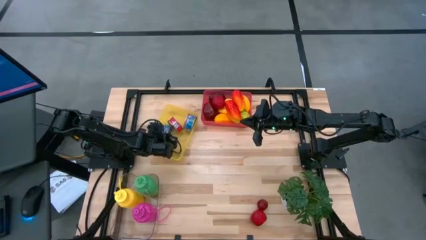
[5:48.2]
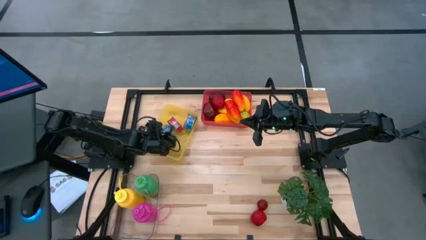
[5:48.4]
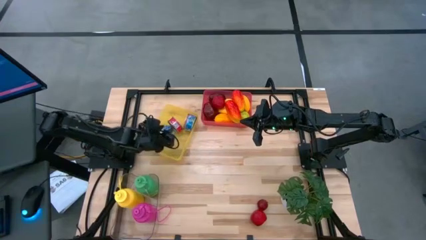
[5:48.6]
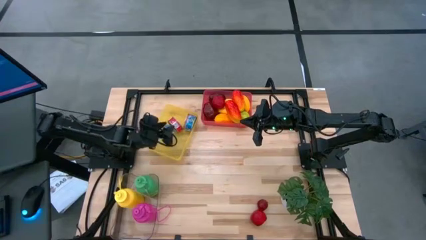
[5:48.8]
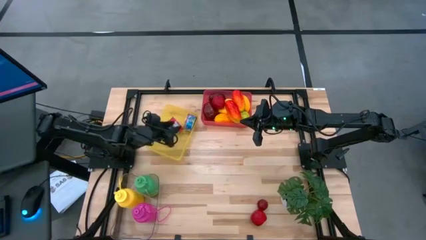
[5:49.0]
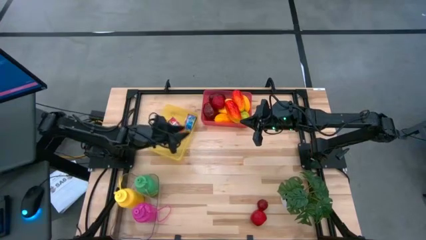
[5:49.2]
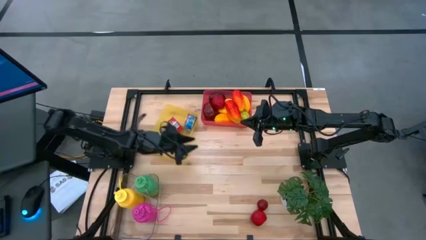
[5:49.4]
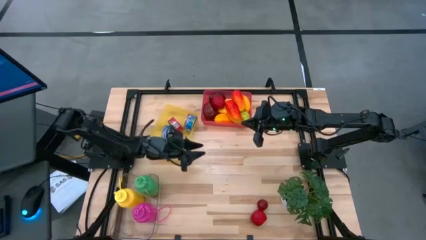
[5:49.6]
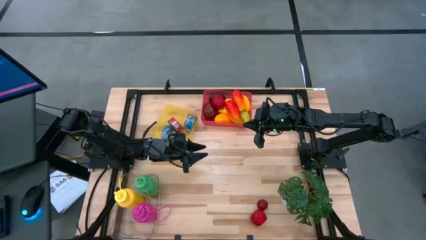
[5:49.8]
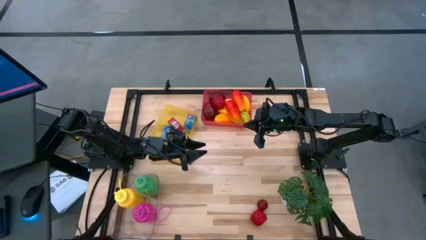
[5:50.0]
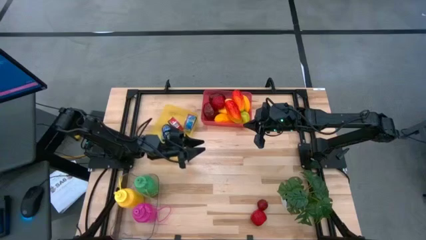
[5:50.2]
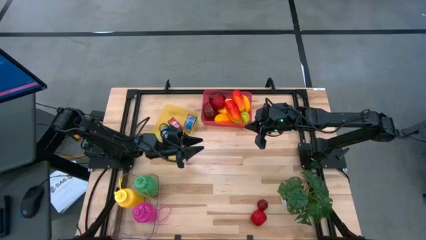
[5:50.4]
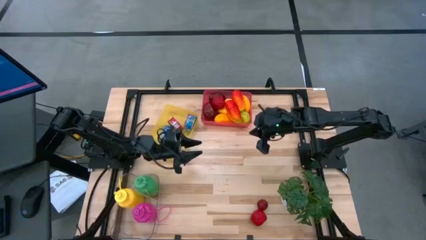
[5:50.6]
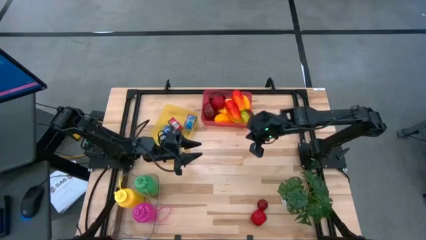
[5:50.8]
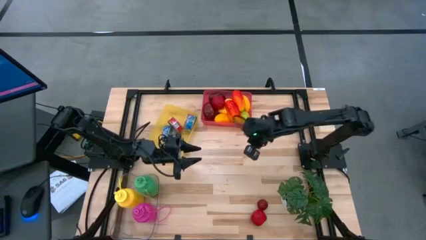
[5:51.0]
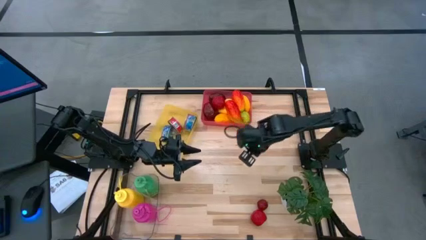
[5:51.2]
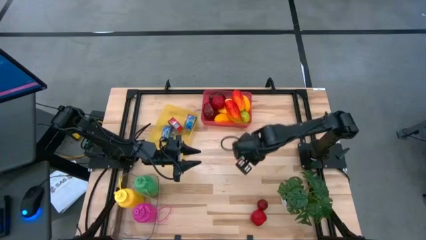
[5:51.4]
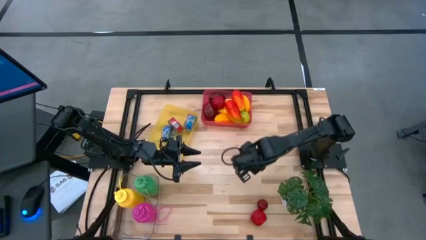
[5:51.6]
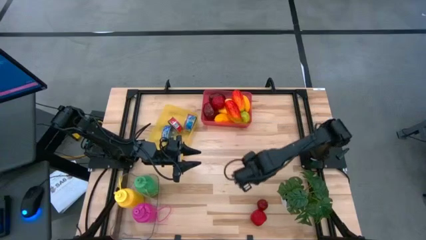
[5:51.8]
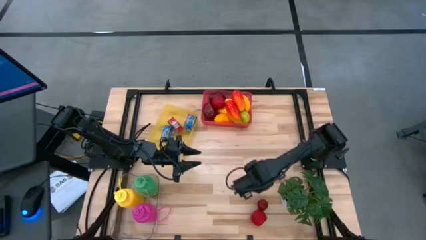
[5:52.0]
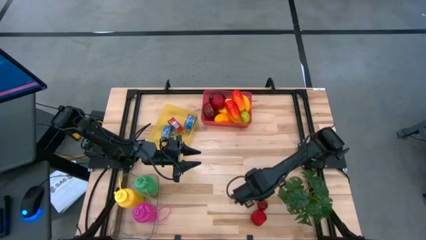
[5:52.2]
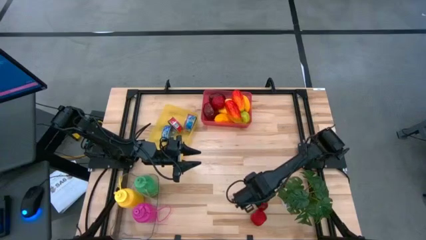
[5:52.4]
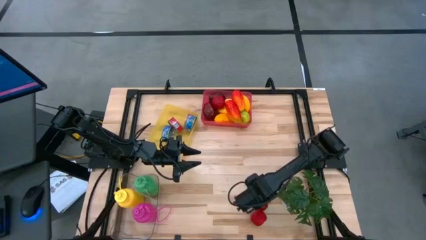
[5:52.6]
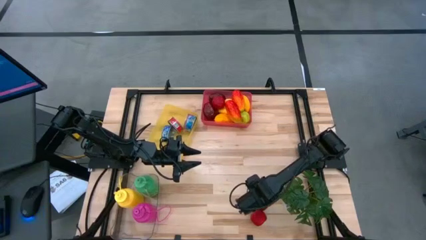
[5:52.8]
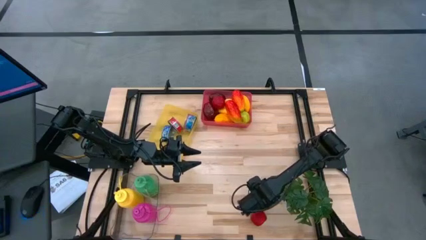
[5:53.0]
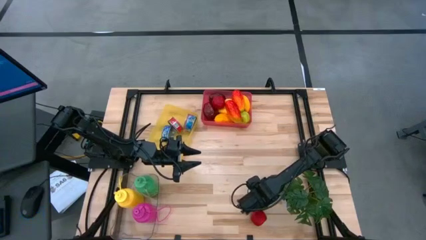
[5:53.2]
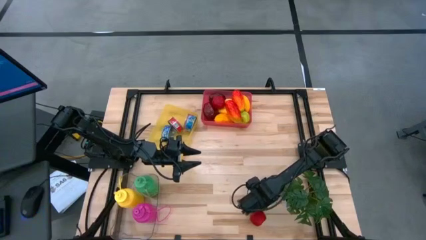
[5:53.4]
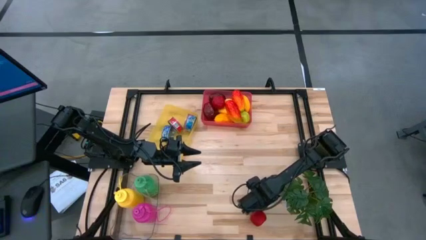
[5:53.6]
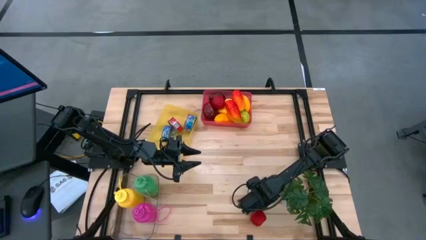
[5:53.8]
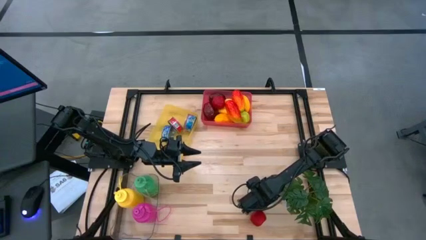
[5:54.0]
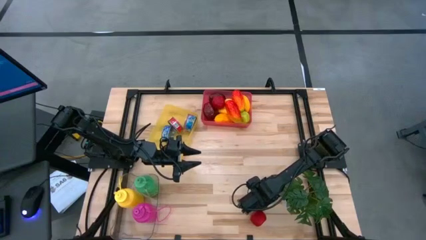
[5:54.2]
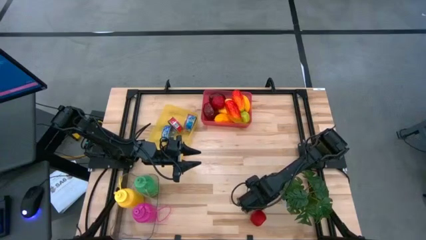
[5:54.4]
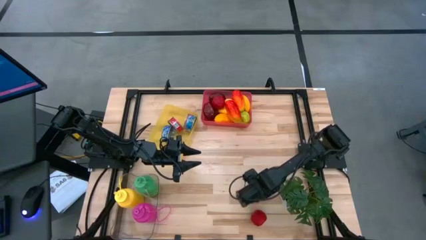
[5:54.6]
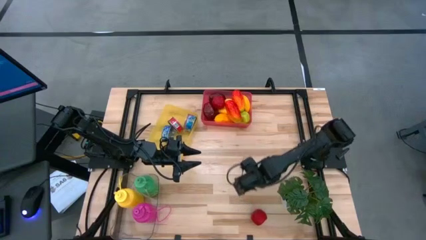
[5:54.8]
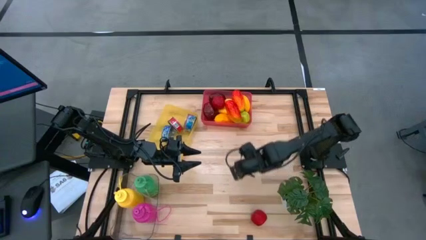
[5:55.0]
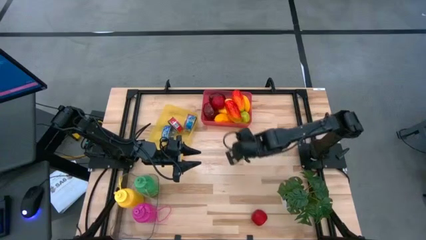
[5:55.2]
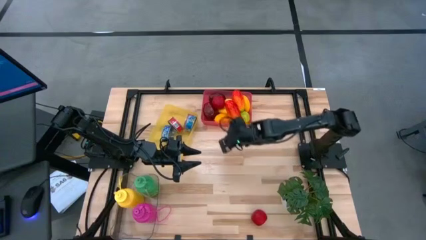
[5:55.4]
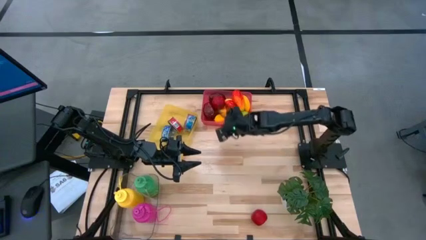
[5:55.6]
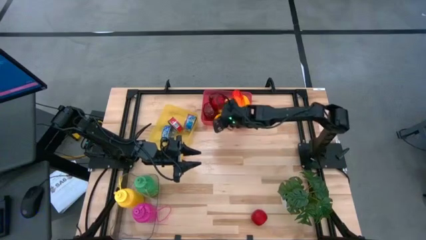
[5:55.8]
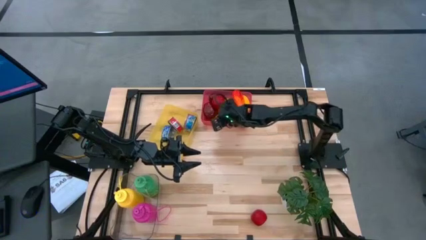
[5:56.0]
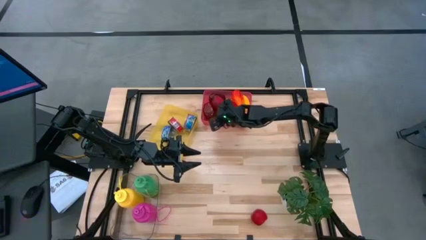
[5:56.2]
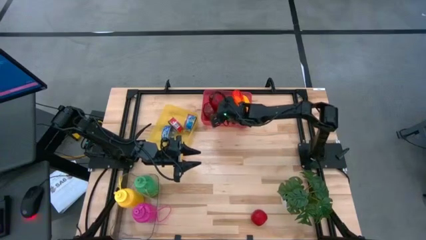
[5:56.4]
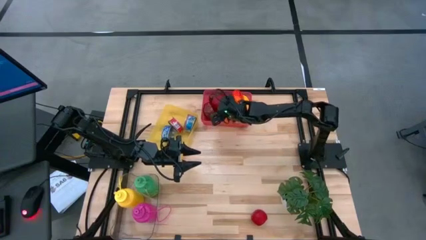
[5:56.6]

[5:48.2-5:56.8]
Task: Pick & Place Food Item
Put the pomegranate into the pink bin

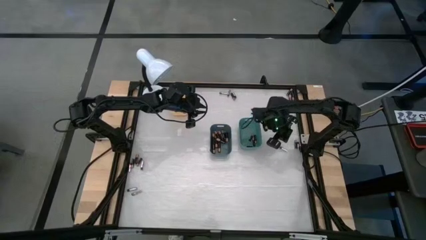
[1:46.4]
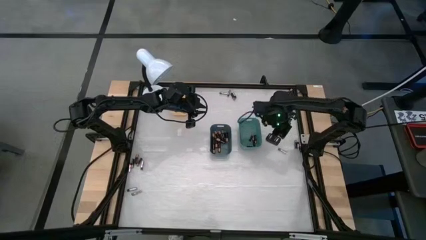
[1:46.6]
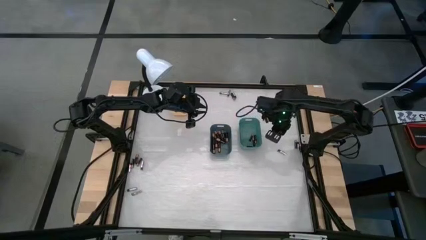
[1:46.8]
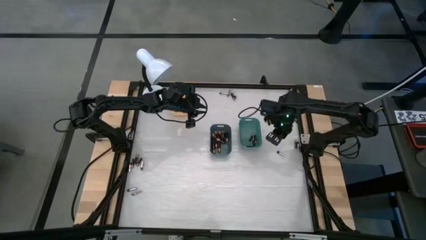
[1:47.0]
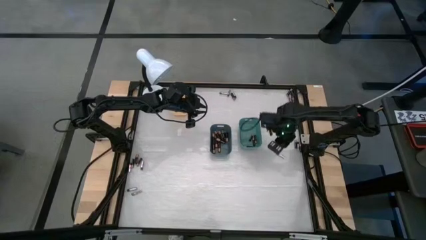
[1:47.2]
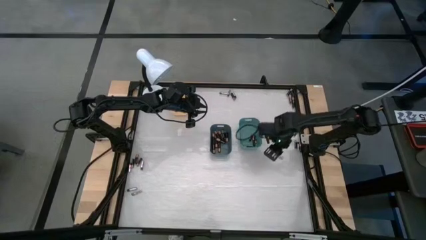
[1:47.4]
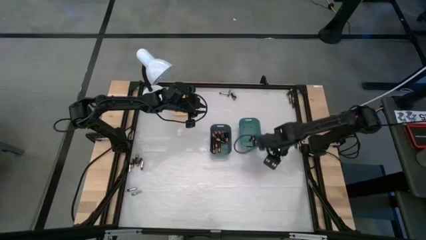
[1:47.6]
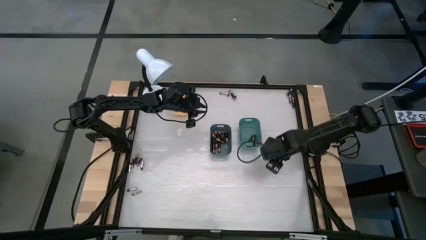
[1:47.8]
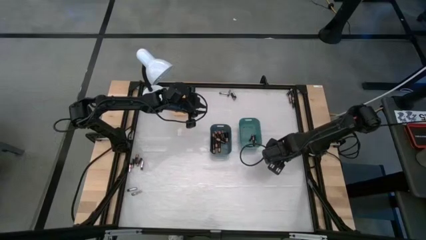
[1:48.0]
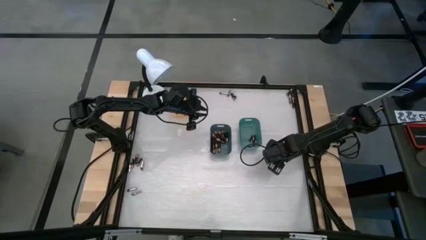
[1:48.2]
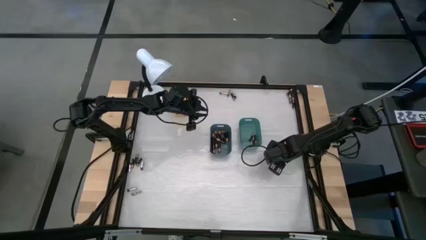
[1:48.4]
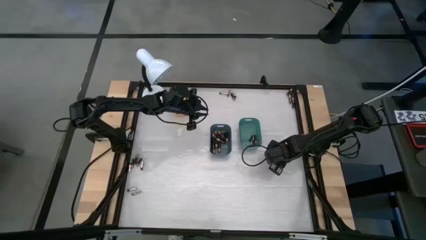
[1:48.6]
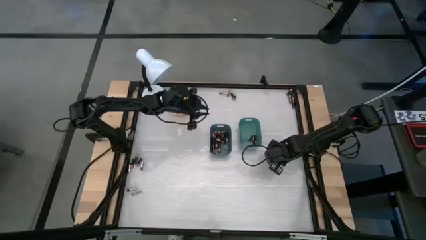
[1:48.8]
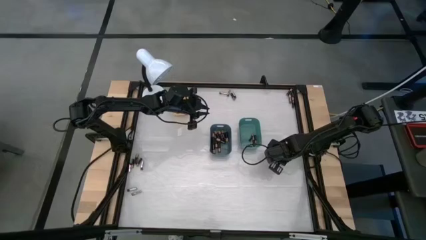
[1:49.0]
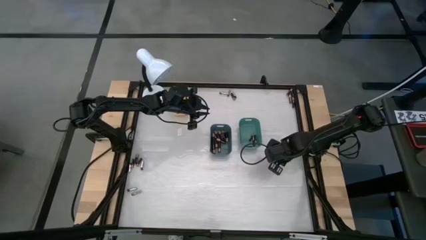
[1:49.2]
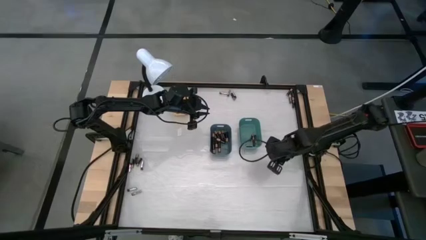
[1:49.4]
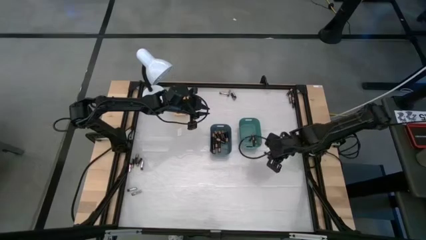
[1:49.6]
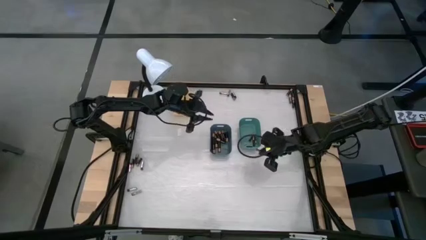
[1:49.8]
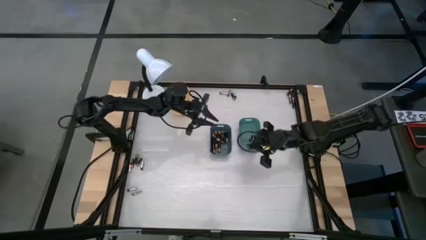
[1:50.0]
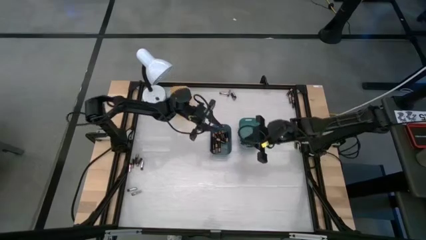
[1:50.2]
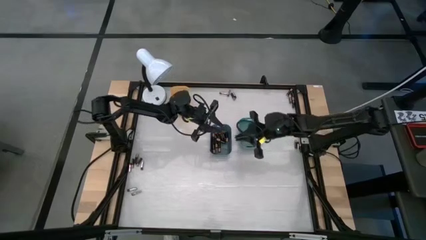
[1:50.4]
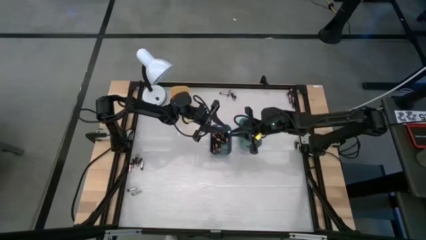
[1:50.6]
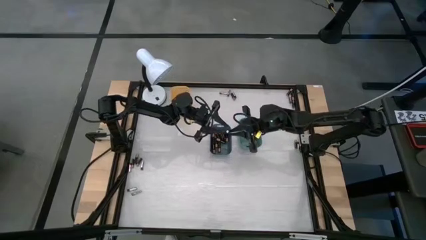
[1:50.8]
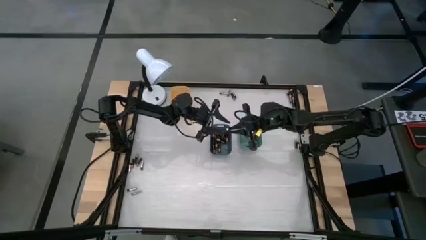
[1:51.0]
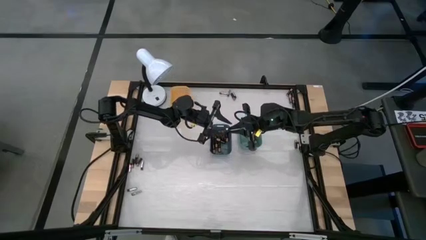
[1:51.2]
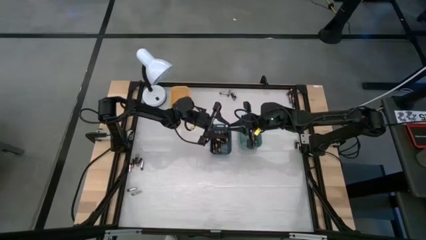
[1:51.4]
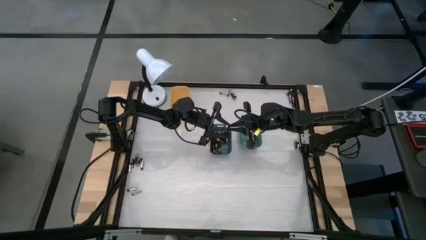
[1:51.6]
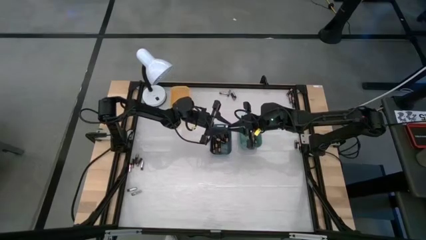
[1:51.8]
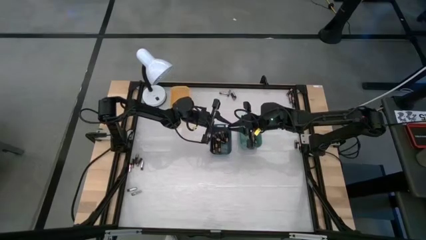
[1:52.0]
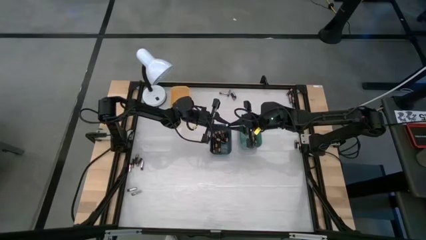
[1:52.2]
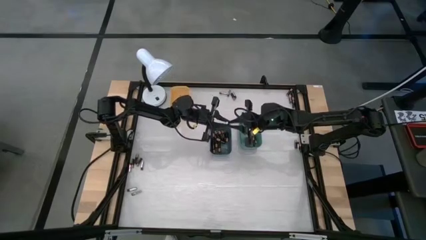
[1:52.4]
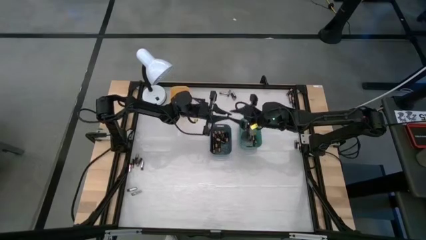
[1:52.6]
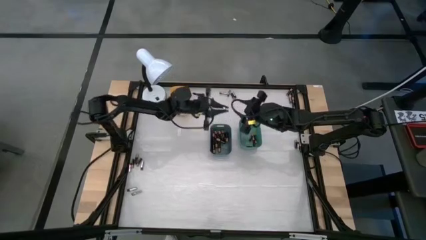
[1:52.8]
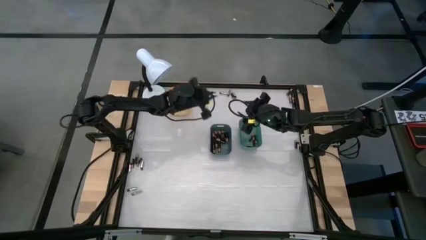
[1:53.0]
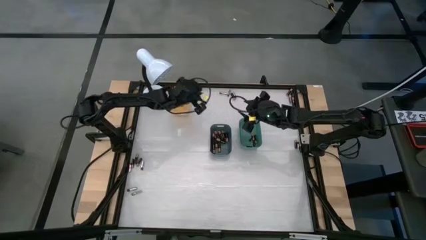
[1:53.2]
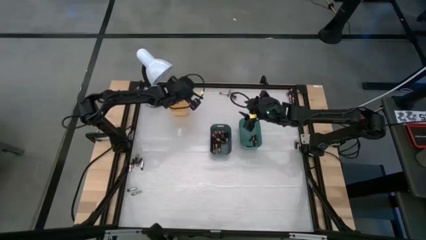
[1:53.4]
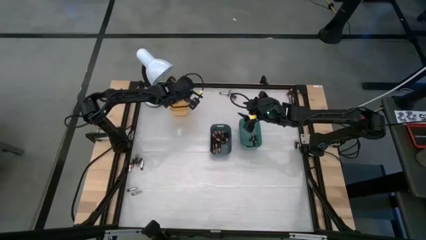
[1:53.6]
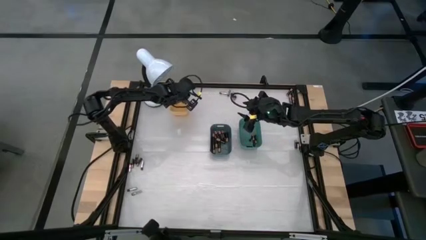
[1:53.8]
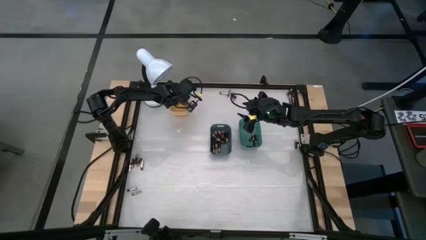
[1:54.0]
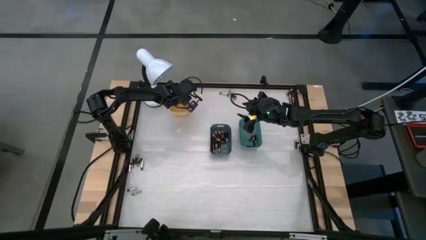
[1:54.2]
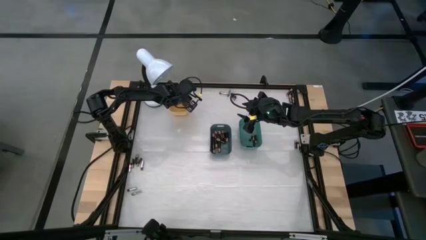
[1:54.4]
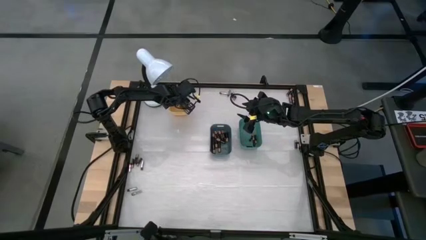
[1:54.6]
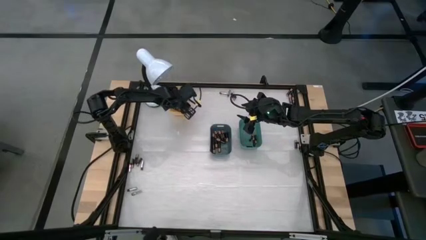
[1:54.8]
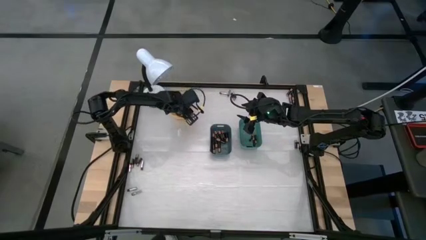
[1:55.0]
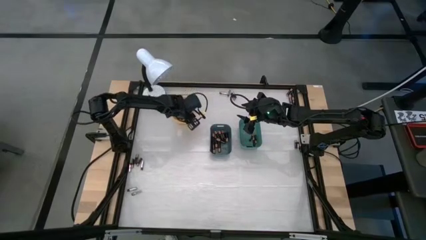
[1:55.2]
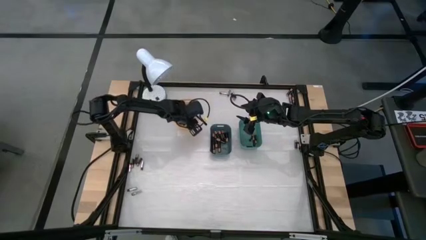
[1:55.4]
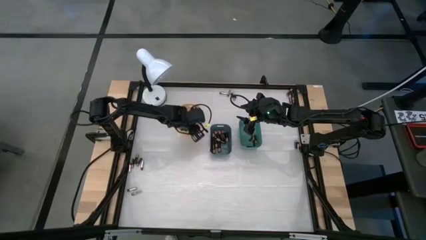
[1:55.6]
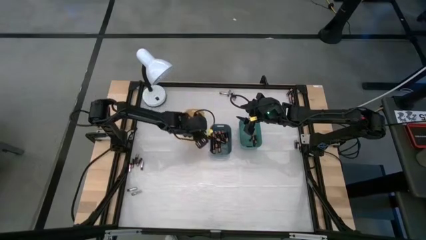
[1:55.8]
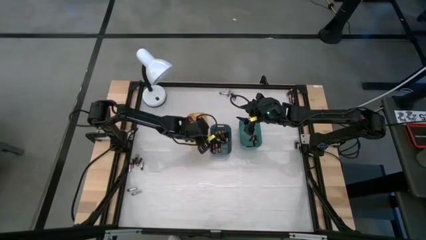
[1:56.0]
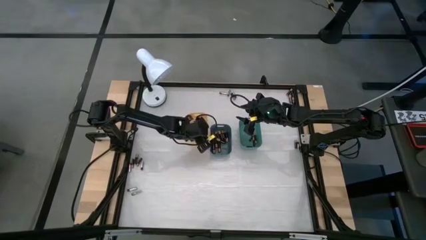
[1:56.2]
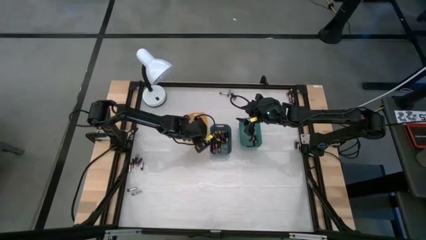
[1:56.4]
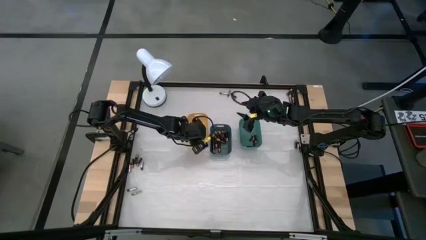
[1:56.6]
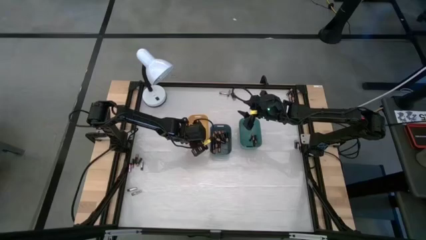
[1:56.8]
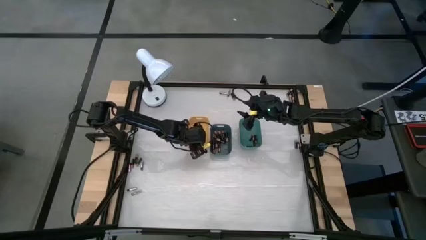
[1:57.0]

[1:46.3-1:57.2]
Task: Sort batteries
Put the silver battery into the yellow bin
